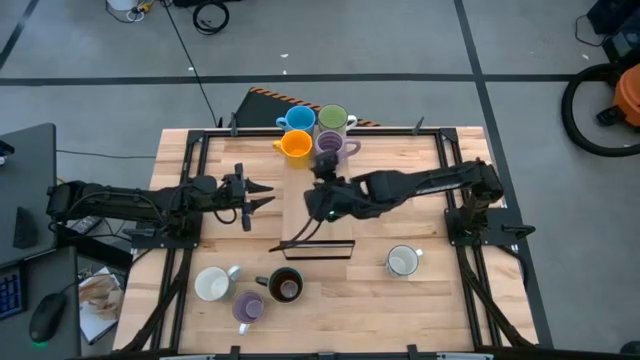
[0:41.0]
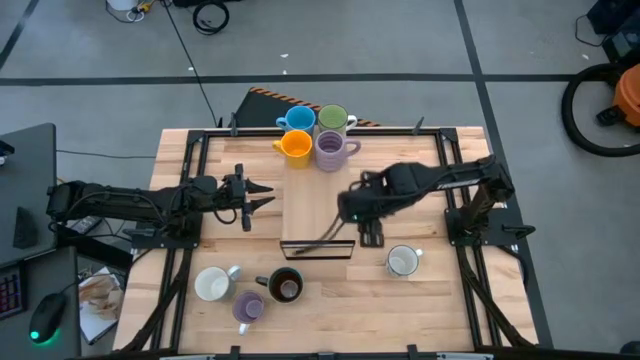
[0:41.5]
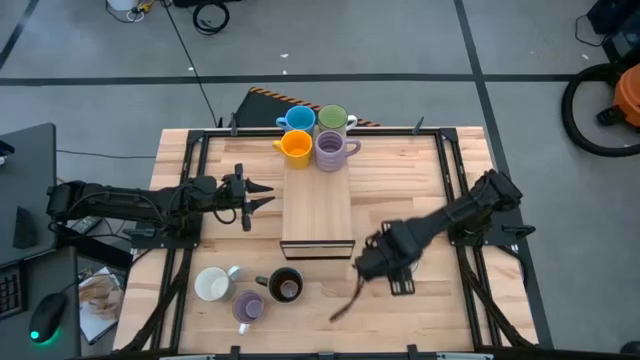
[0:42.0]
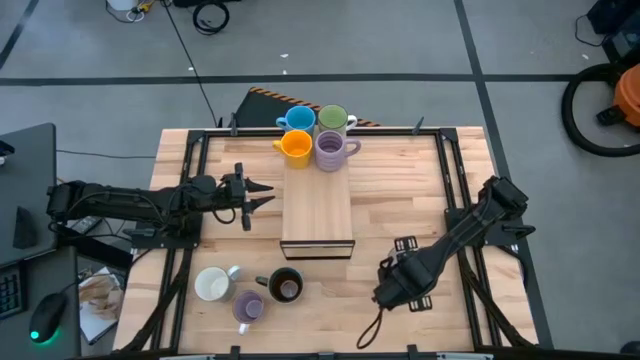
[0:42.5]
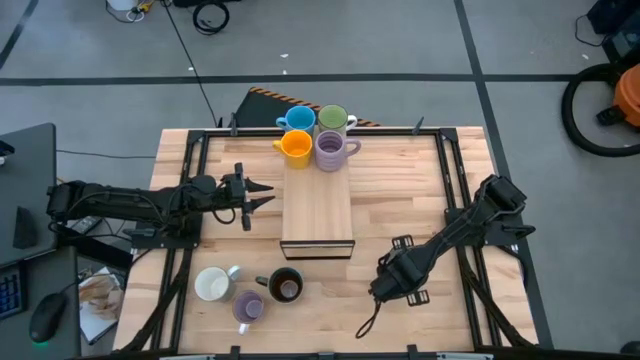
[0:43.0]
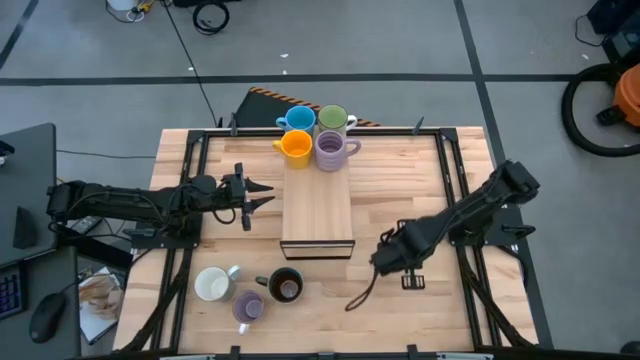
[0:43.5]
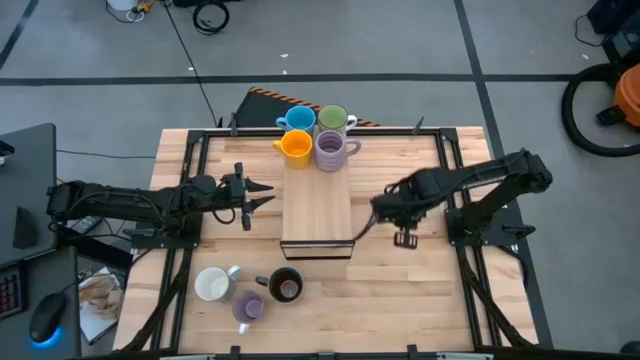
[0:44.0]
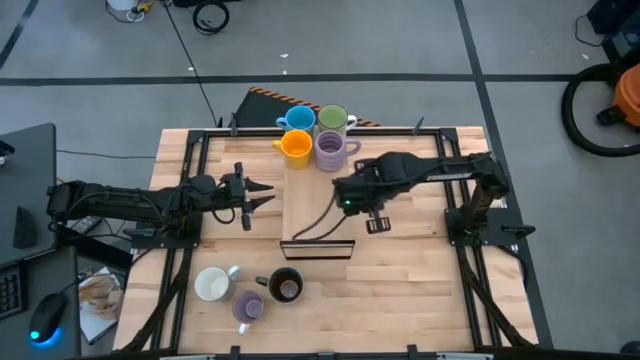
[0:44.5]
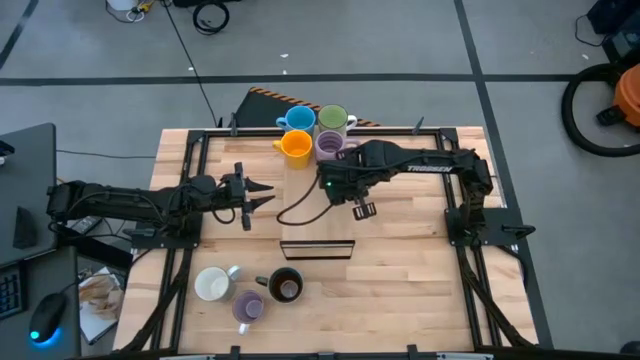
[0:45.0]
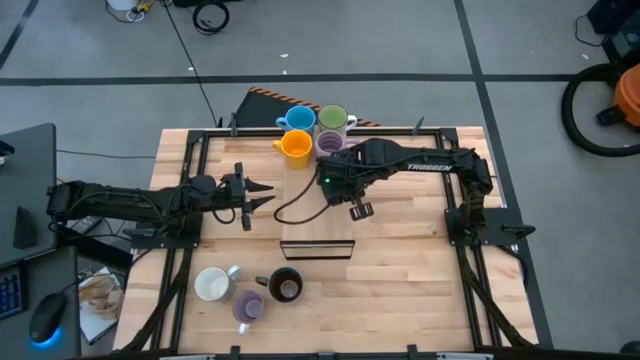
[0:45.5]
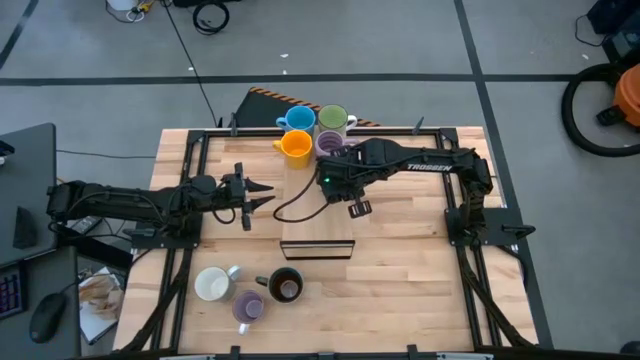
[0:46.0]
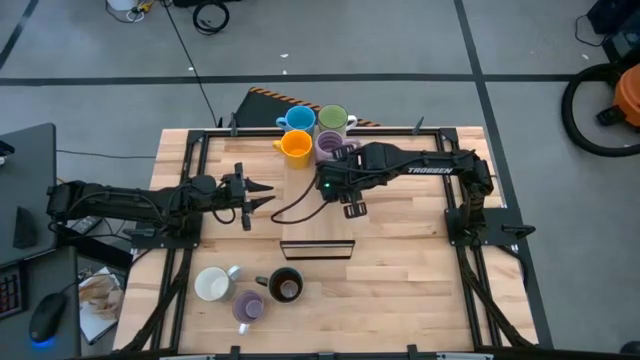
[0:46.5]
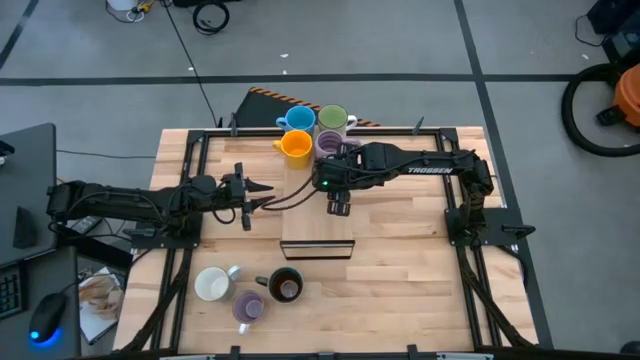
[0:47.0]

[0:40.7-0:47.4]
Task: Place coffee mugs
Put the white-blue mug on the shelf

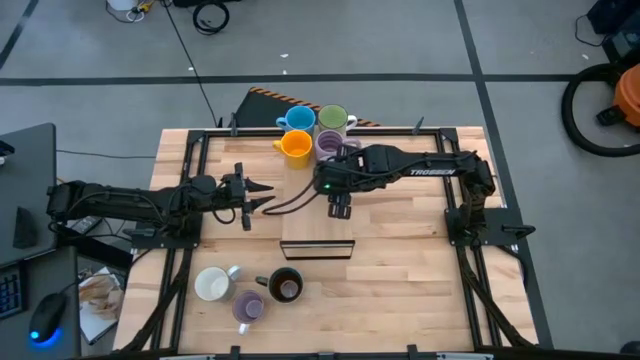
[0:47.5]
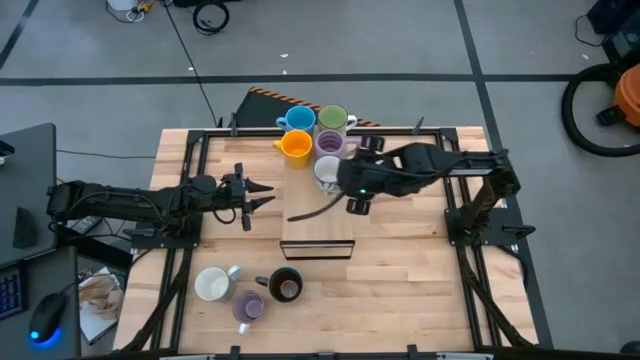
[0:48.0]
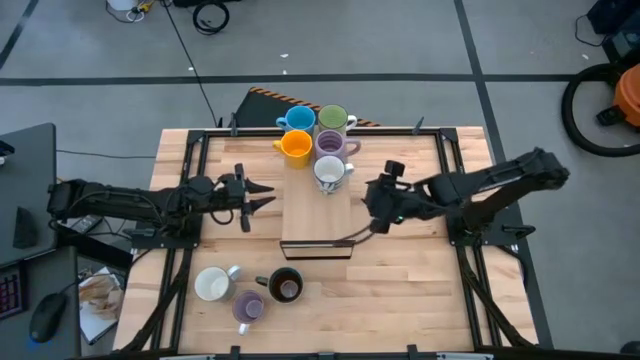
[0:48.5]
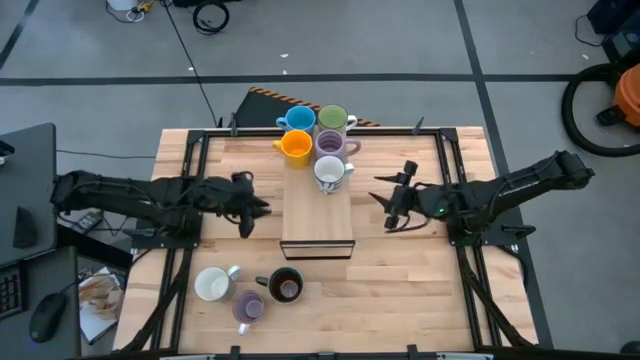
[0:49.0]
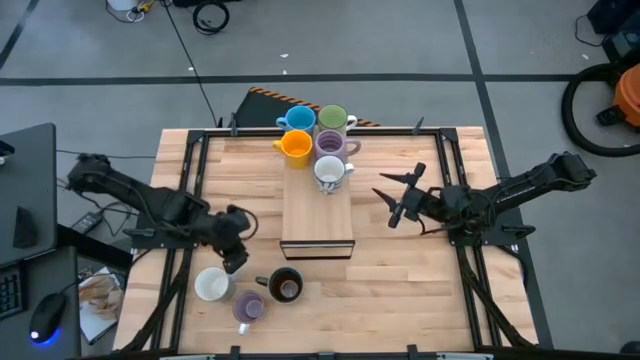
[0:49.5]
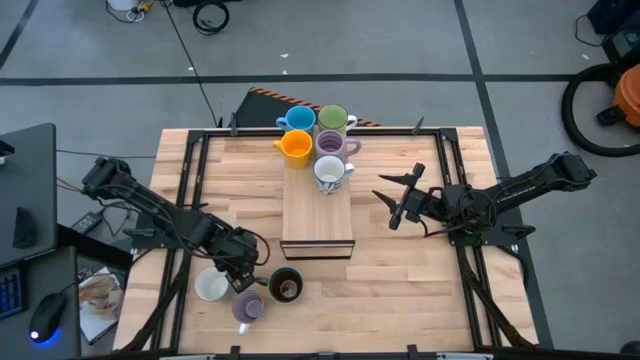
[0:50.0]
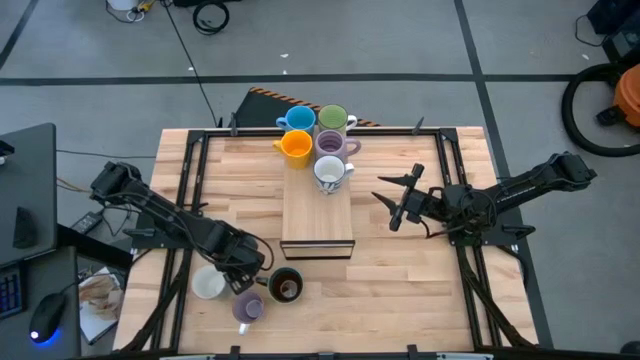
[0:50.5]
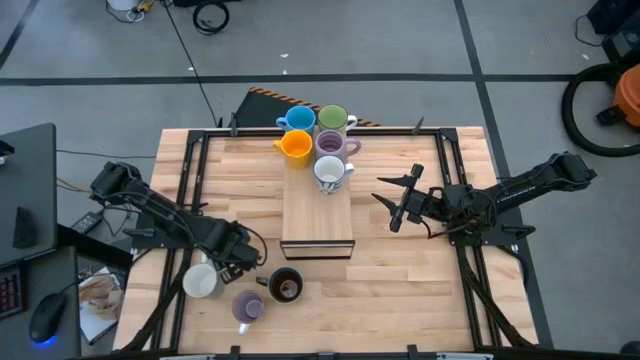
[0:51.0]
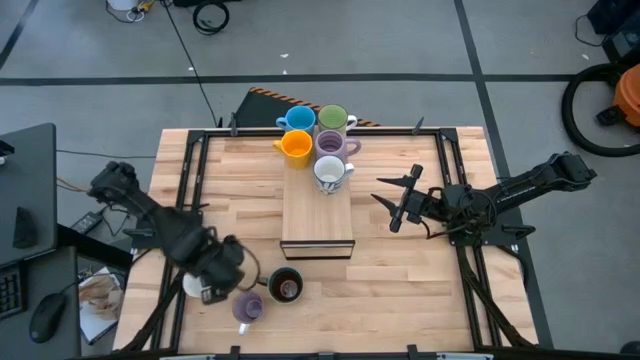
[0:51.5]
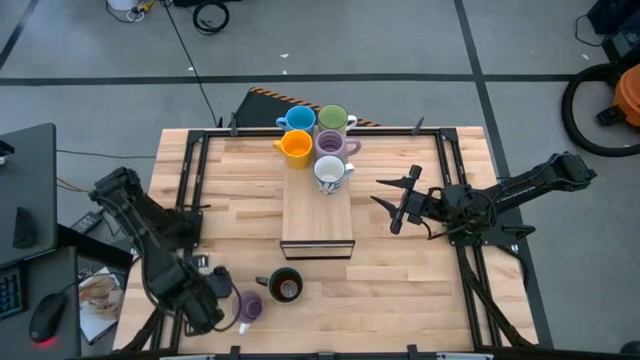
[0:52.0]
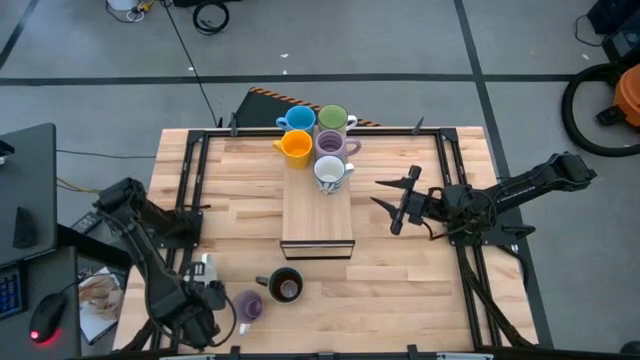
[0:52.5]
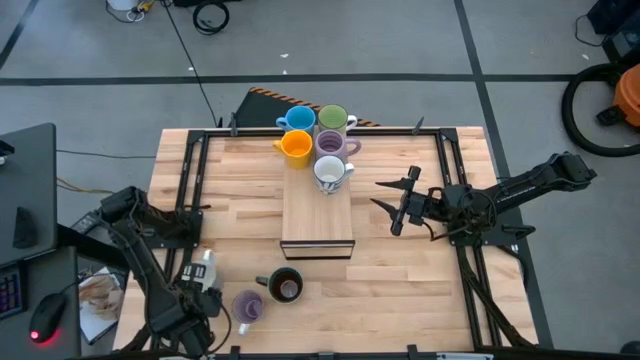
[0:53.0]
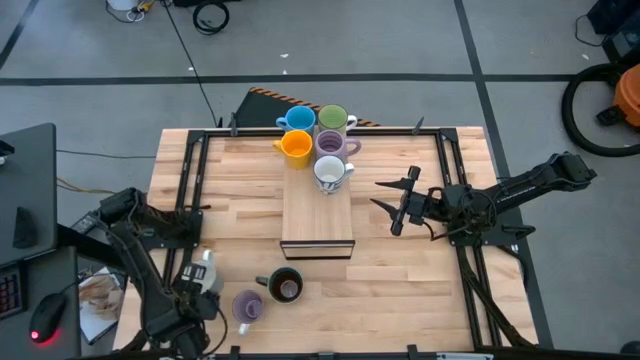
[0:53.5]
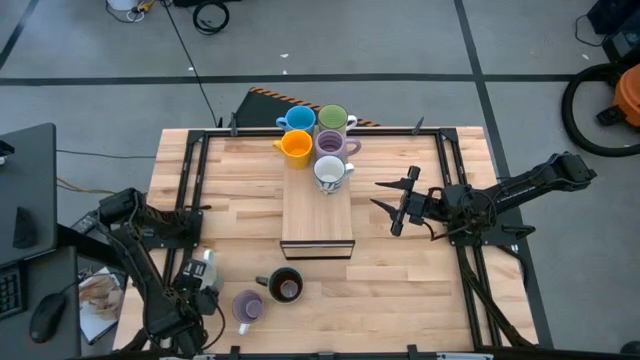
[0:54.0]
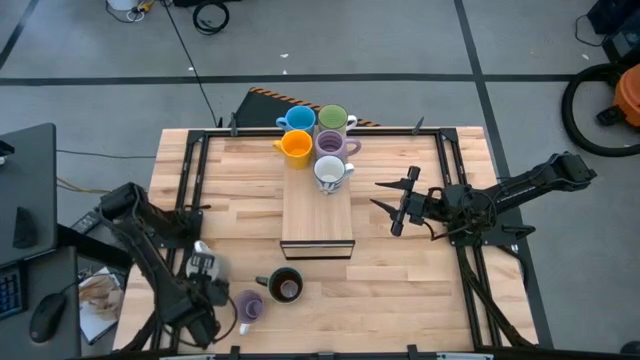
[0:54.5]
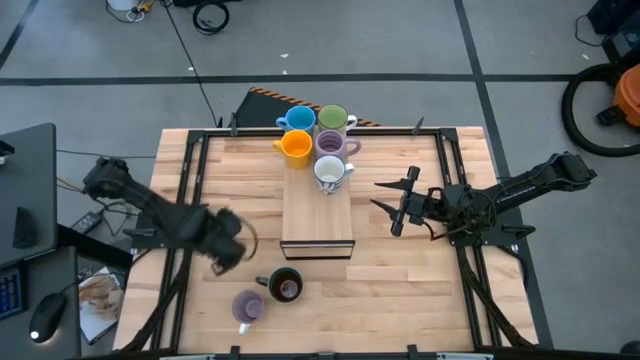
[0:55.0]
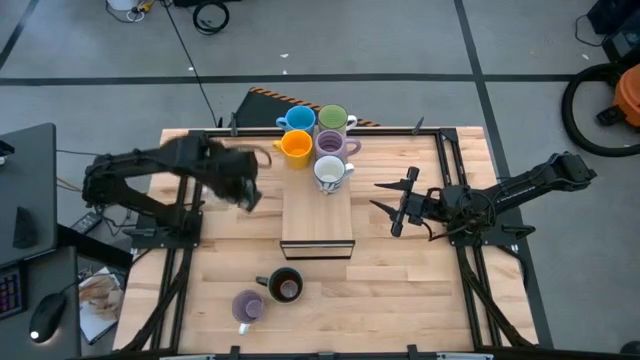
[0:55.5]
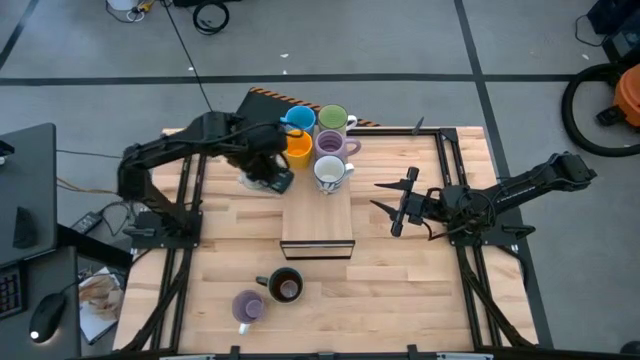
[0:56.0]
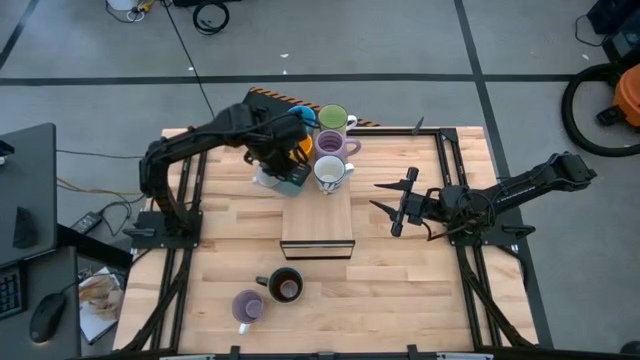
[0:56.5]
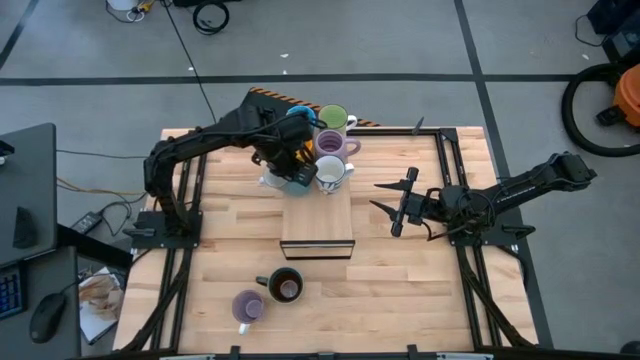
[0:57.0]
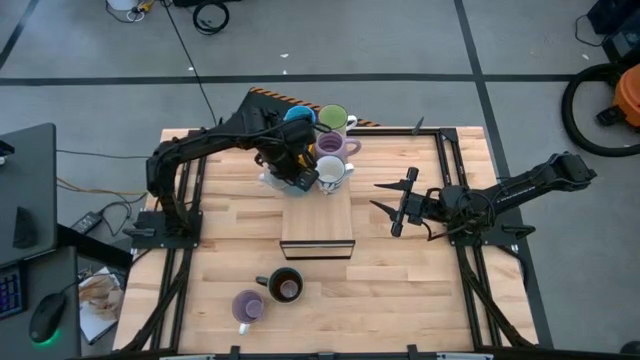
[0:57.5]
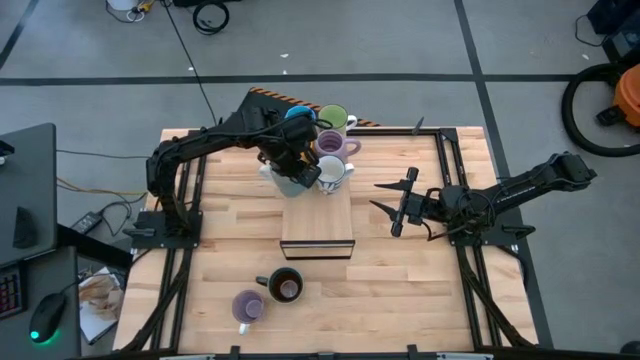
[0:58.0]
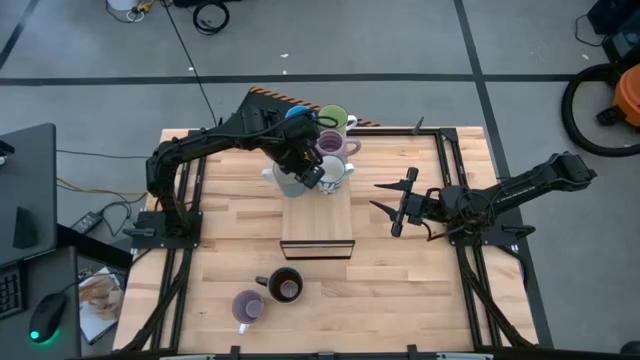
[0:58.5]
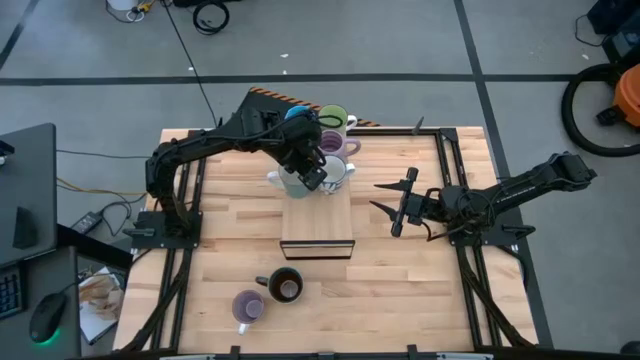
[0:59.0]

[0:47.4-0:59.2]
Put the light blue mug on the shelf

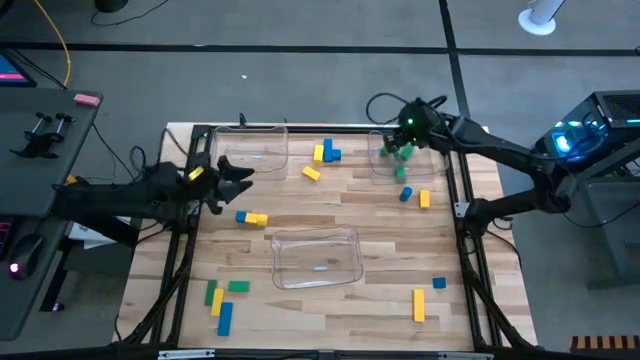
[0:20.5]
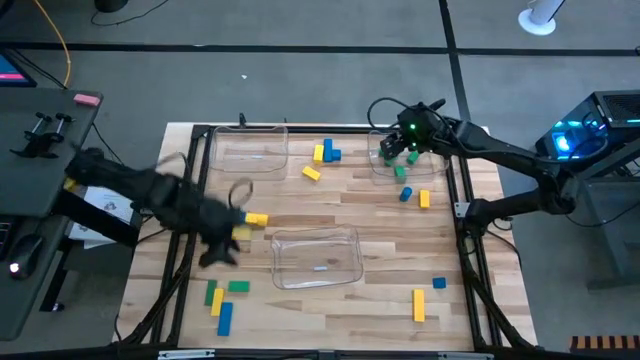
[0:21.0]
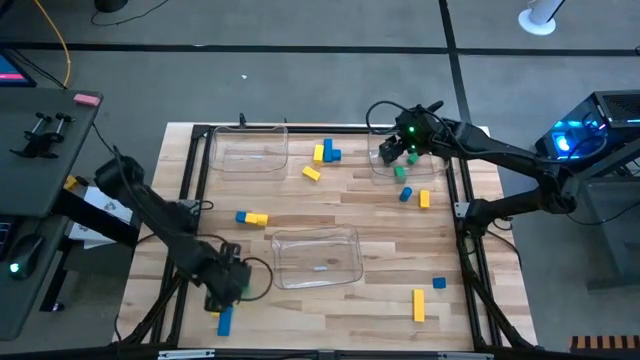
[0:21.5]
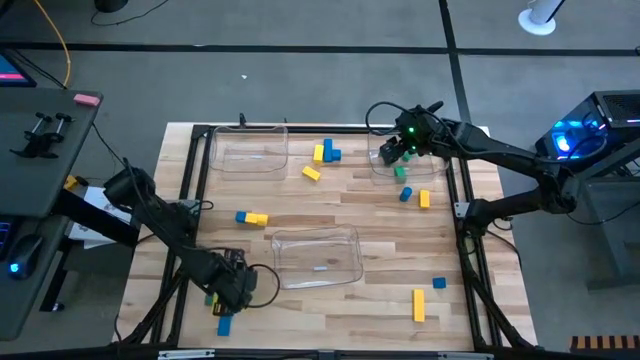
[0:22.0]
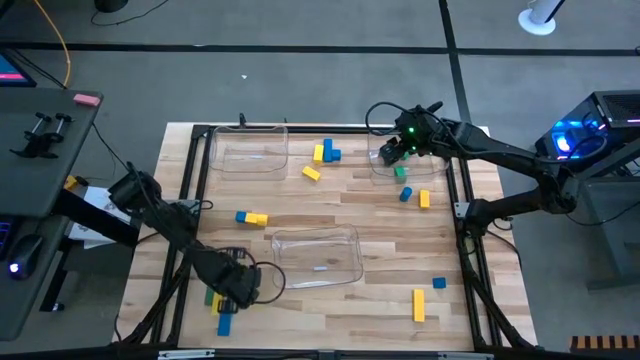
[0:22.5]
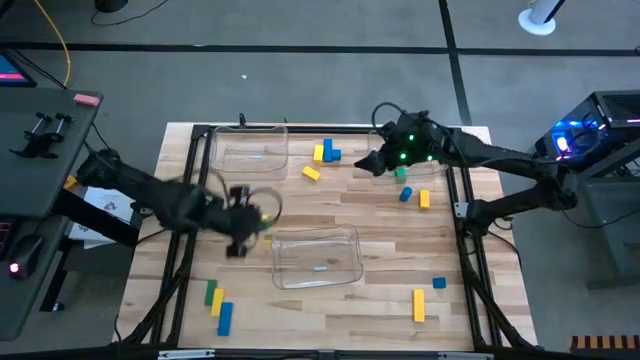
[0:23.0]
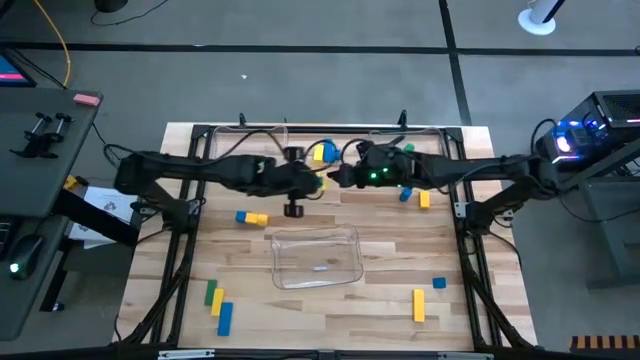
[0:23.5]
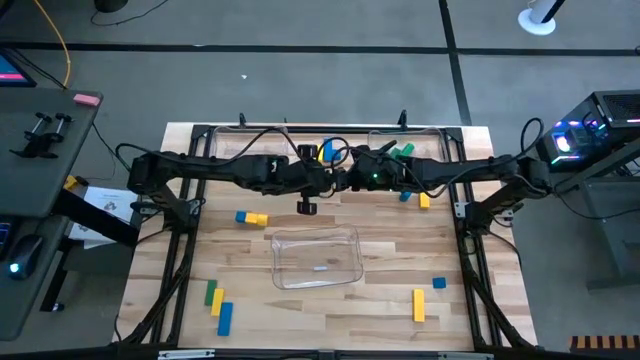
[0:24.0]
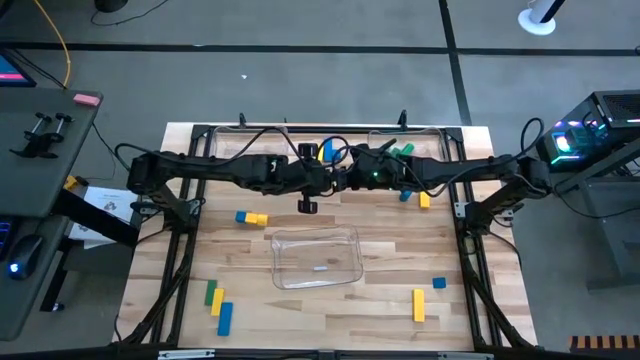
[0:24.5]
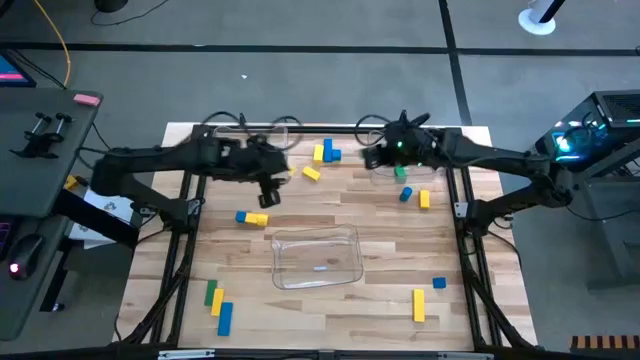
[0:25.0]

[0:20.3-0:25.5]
Task: Sort blocks
Put the green block into the top right transparent bin
